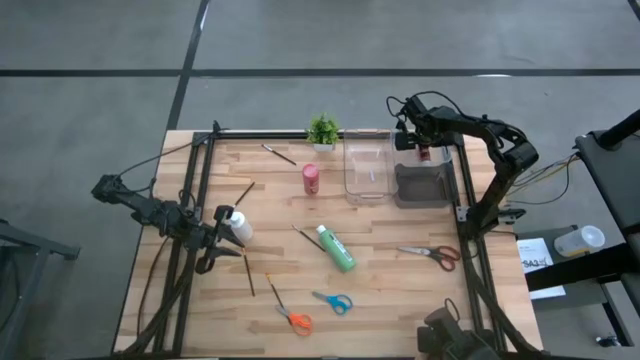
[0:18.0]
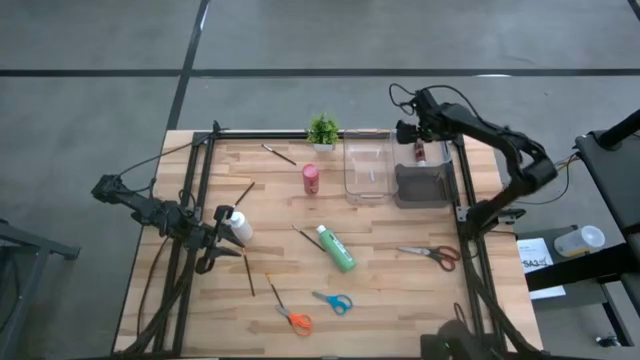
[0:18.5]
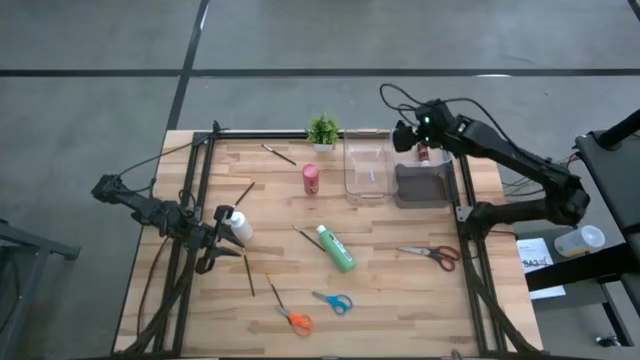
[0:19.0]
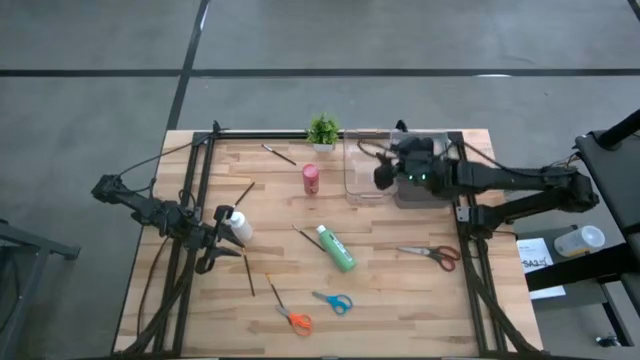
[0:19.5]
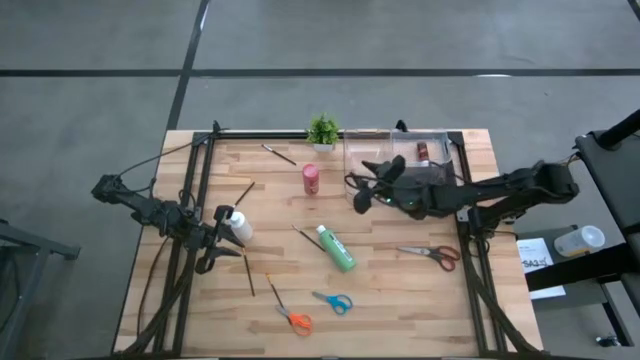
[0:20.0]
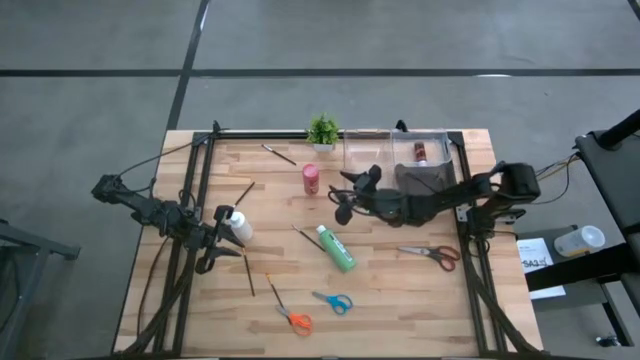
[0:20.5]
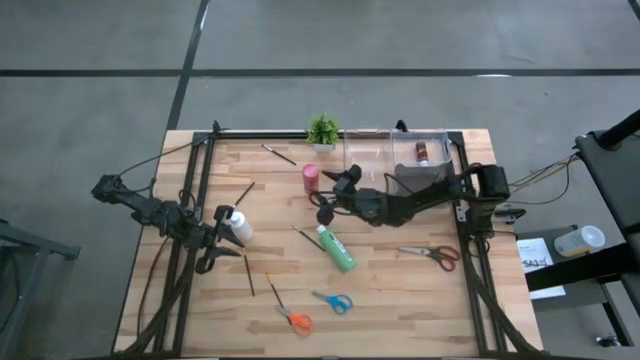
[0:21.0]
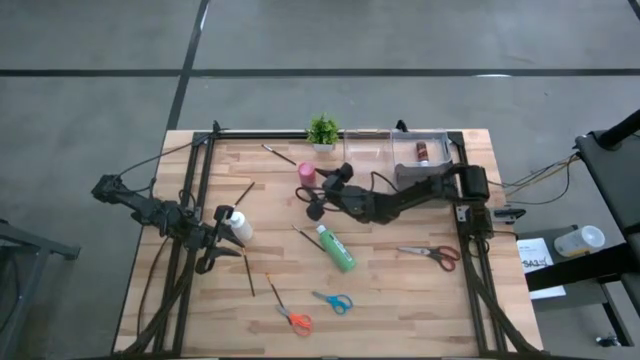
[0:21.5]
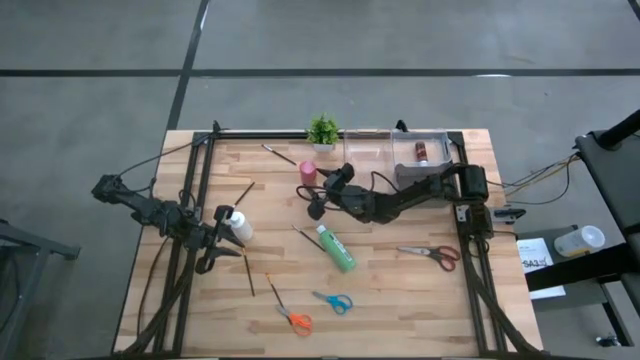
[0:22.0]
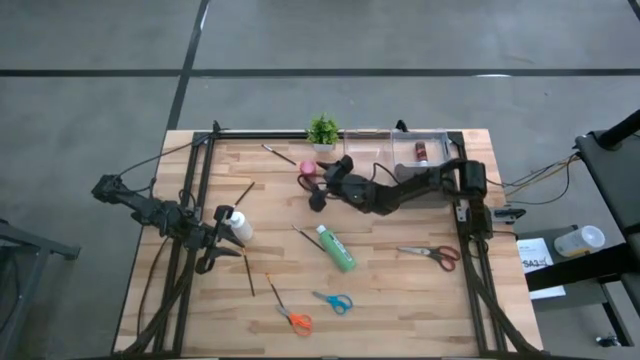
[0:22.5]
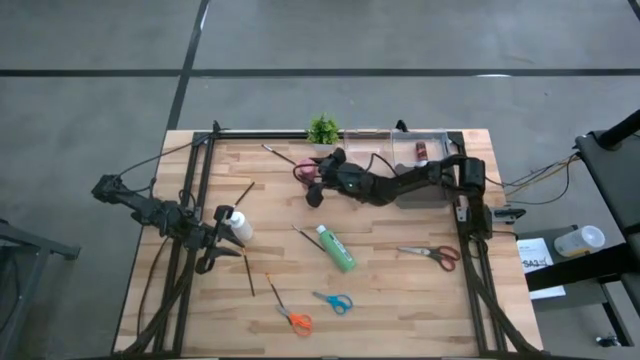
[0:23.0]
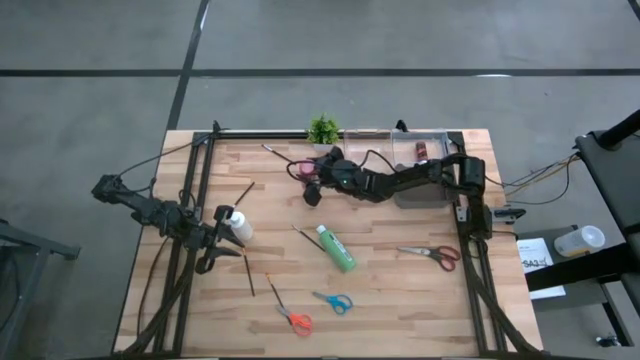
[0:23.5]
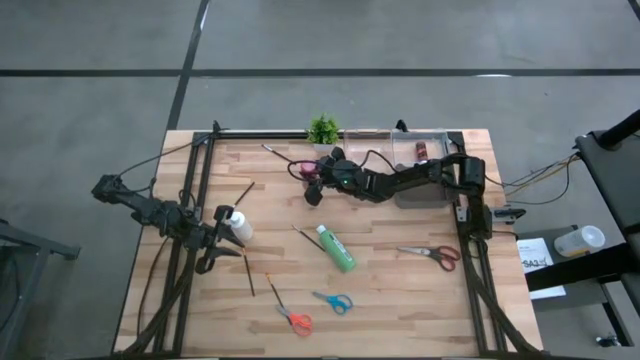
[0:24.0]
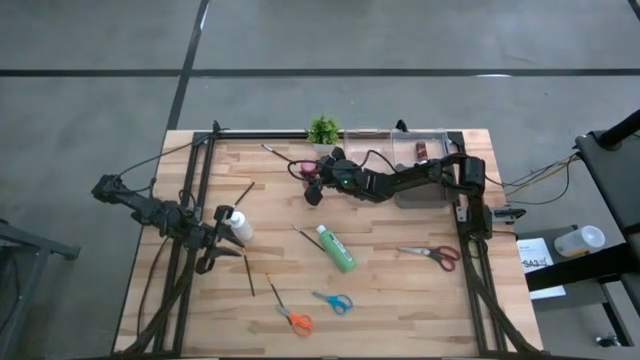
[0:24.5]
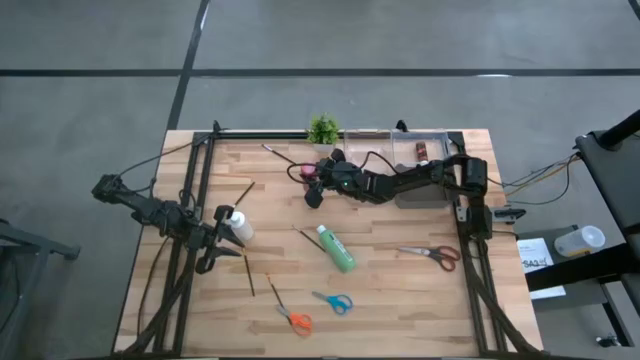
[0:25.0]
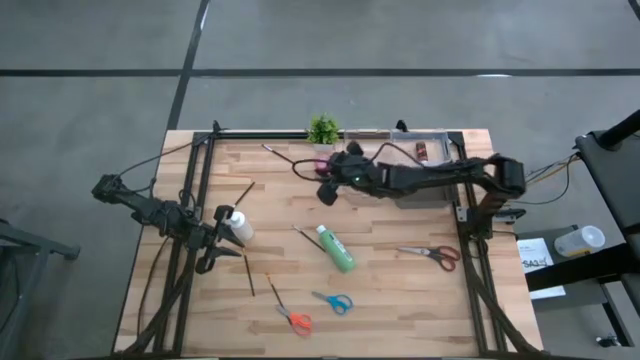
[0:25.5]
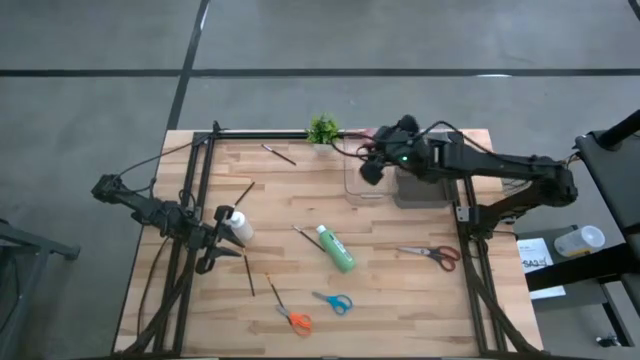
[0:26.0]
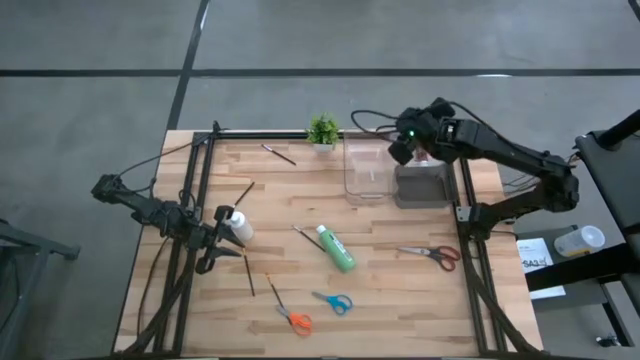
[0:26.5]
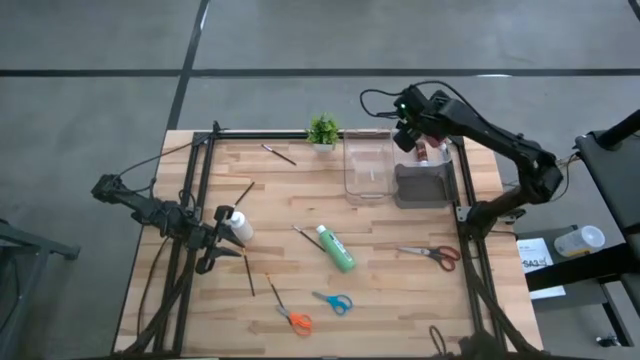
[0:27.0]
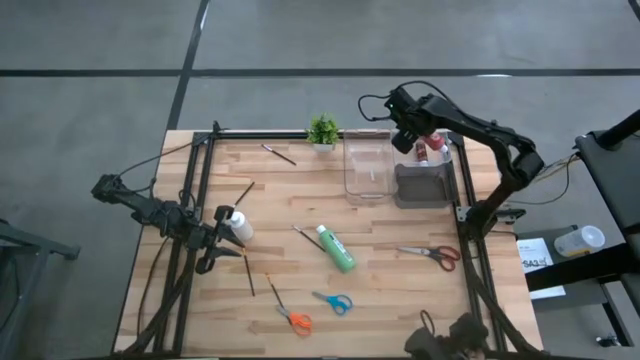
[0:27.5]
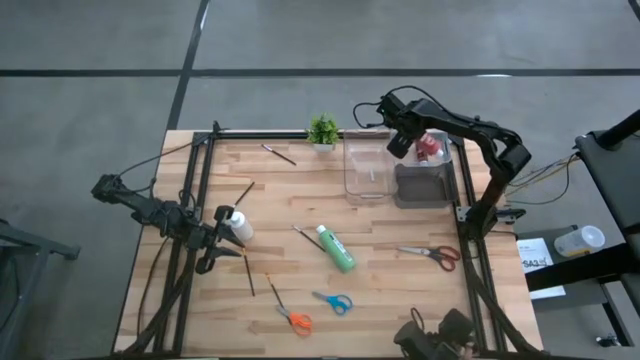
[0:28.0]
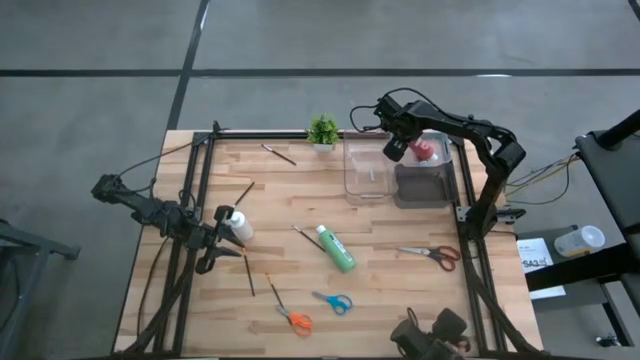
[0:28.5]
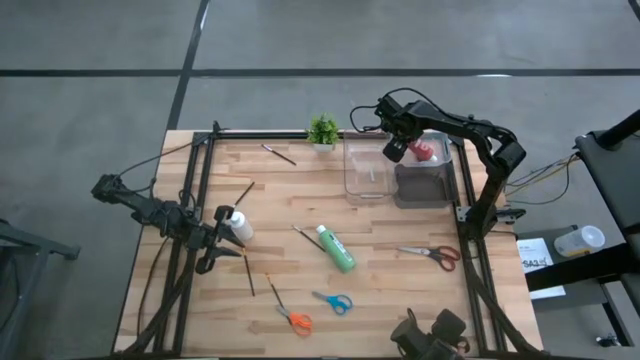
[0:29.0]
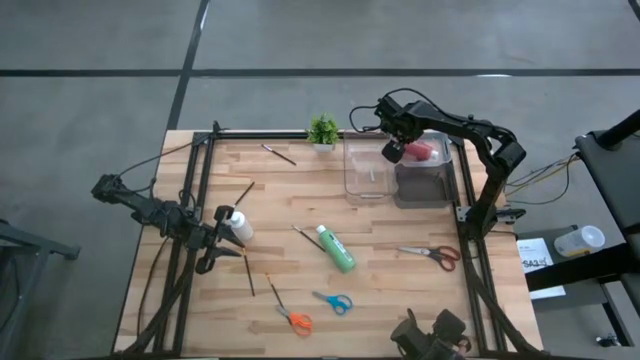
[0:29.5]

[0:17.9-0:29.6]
Task: Pick & Place Paint Supplies
Put the red paint bottle into the right transparent bin

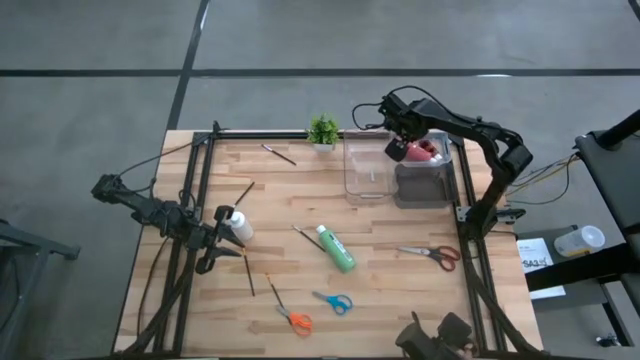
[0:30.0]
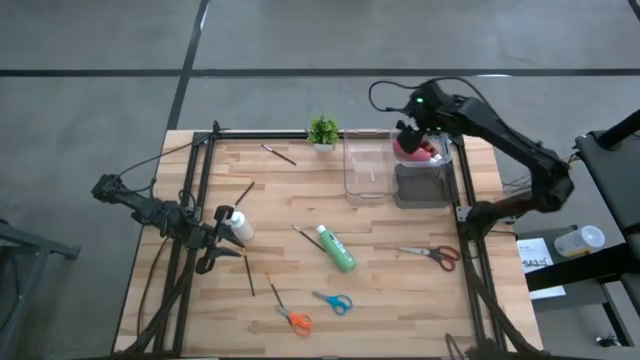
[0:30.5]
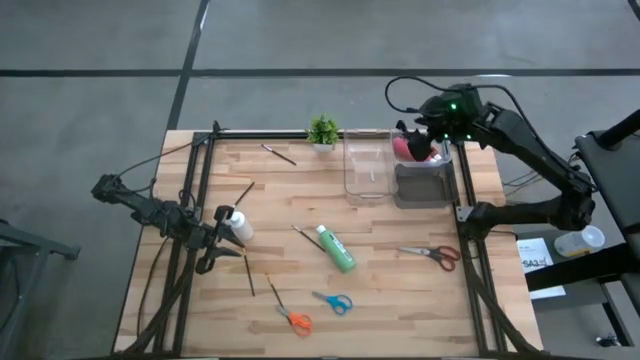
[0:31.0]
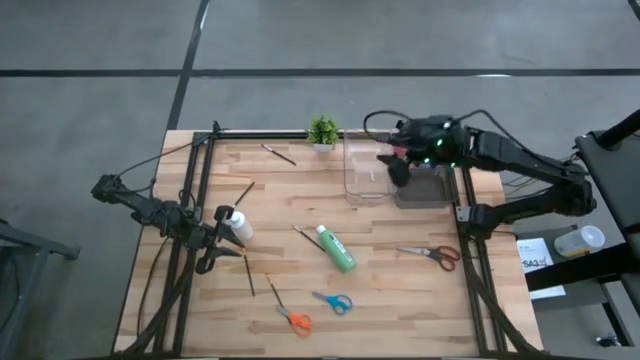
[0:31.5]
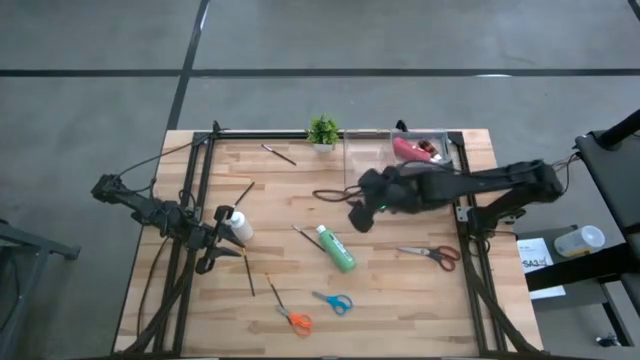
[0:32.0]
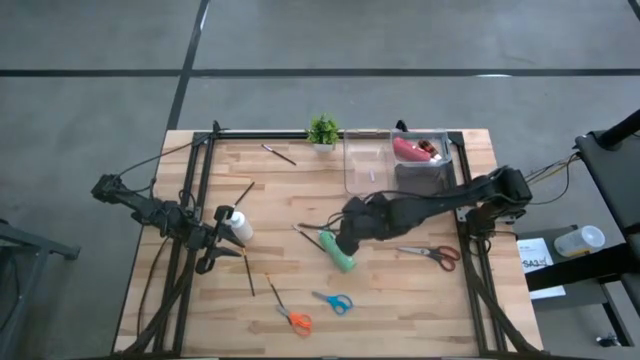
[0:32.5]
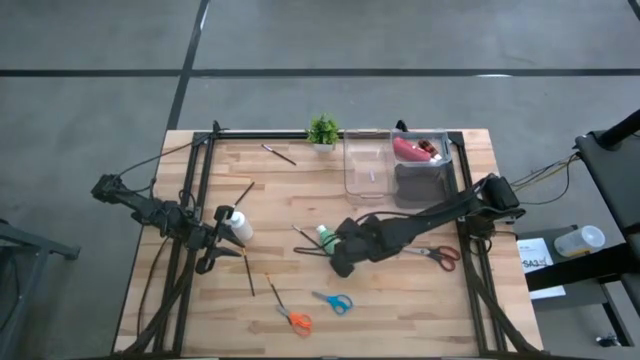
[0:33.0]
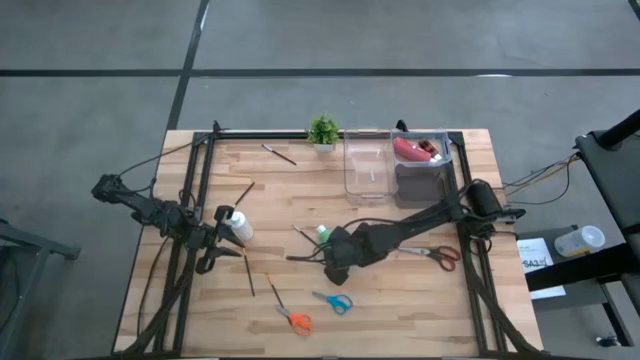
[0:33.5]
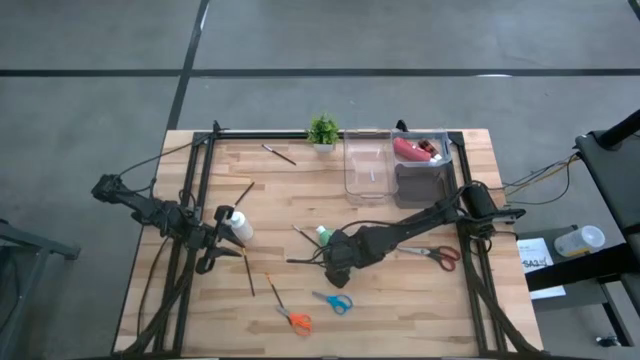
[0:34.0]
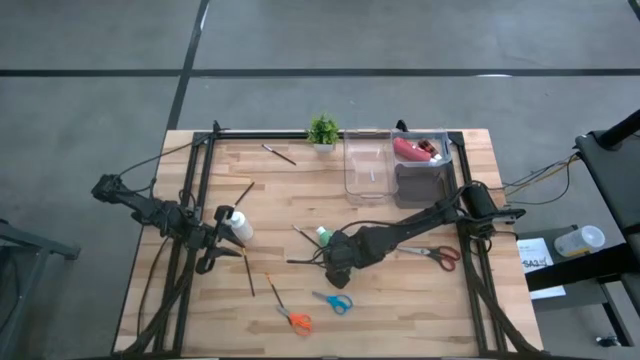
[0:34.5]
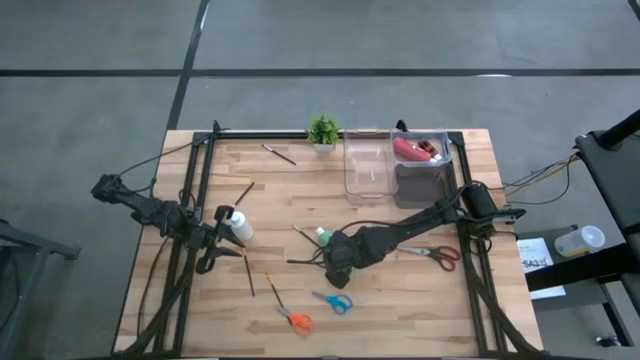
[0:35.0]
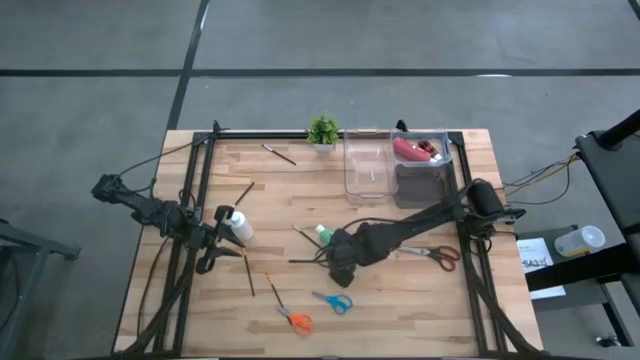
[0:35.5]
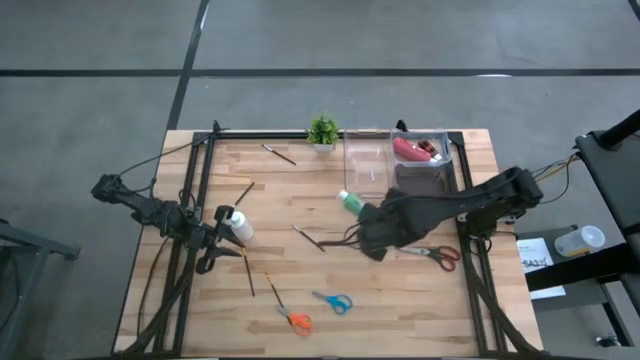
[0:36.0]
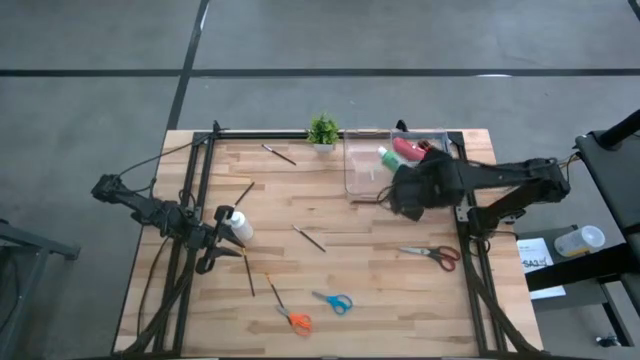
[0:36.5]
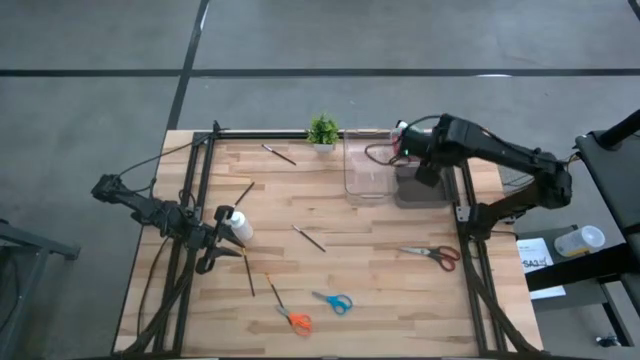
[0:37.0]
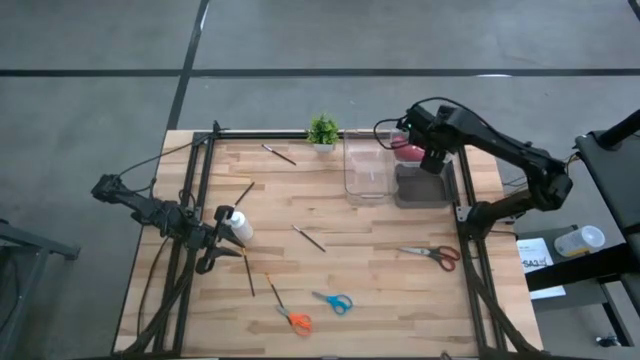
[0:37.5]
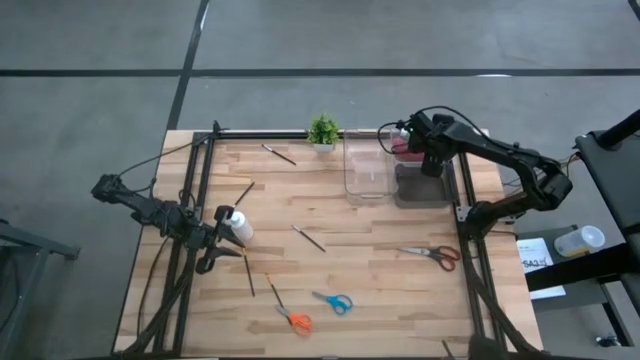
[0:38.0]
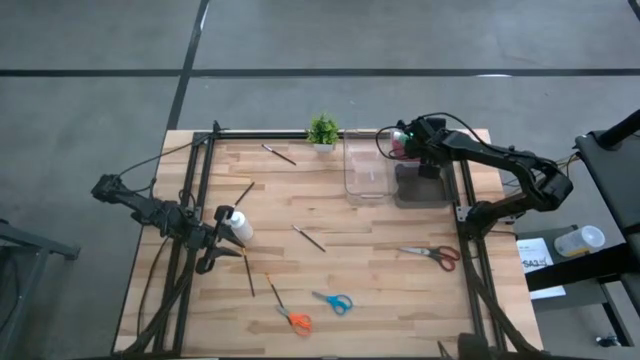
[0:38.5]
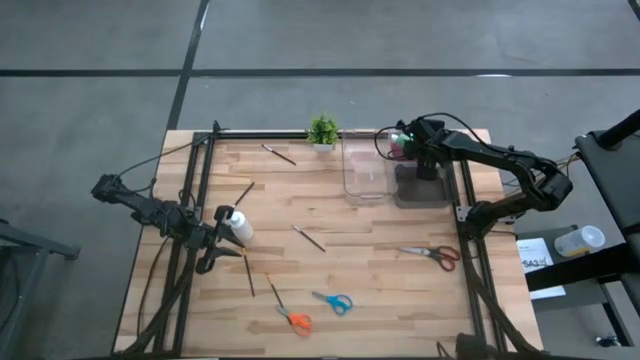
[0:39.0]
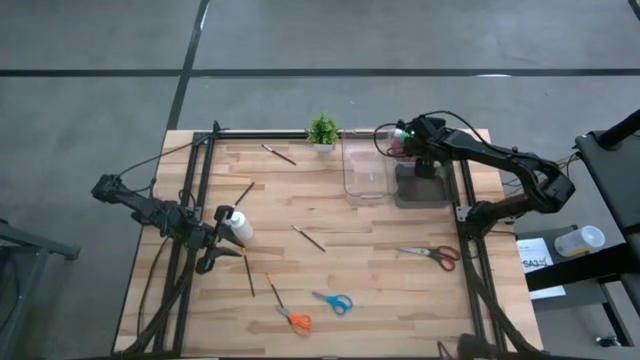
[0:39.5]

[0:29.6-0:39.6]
Put the green paint bottle into the right transparent bin
